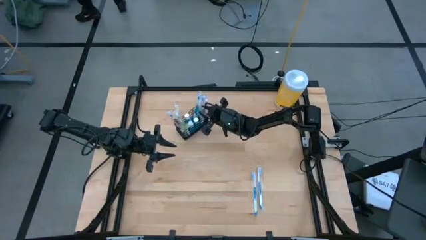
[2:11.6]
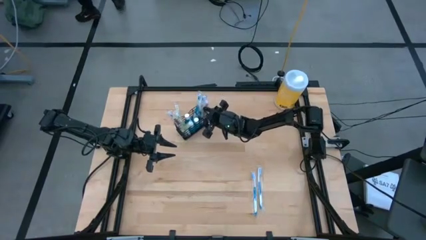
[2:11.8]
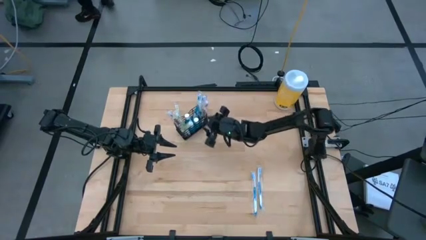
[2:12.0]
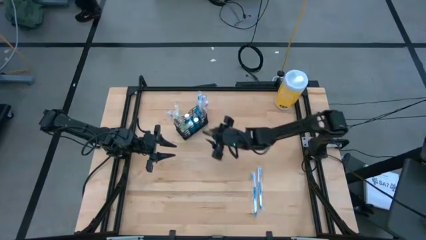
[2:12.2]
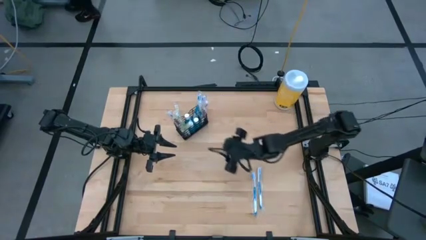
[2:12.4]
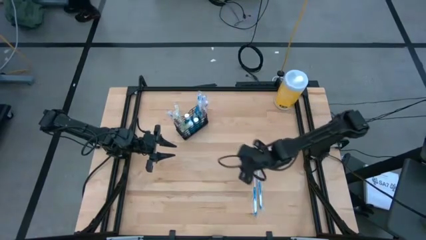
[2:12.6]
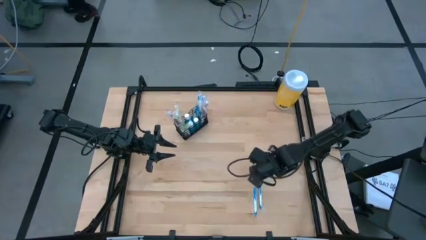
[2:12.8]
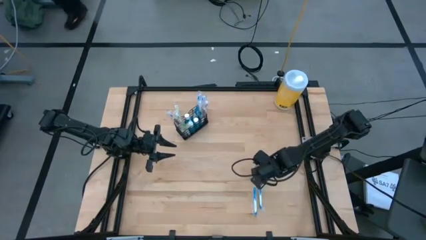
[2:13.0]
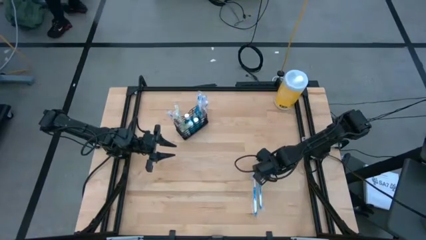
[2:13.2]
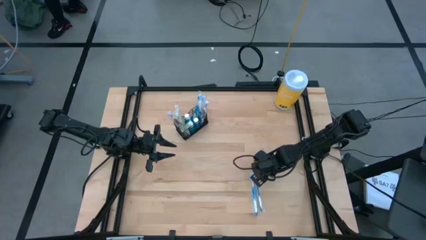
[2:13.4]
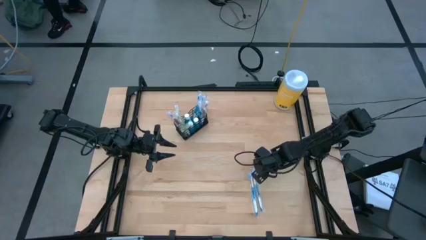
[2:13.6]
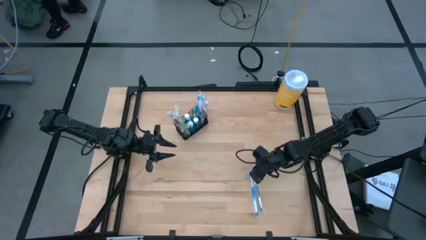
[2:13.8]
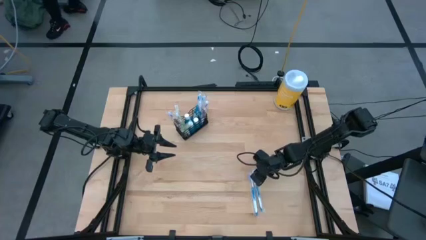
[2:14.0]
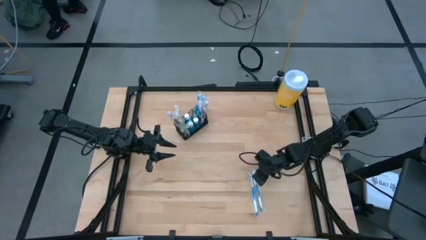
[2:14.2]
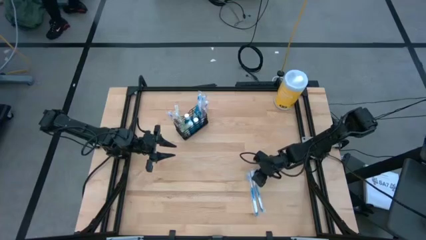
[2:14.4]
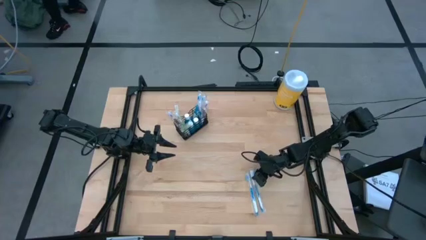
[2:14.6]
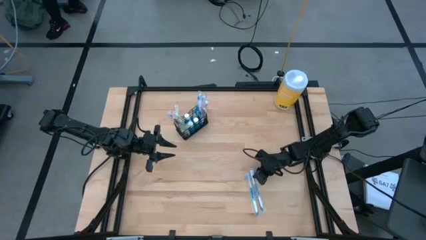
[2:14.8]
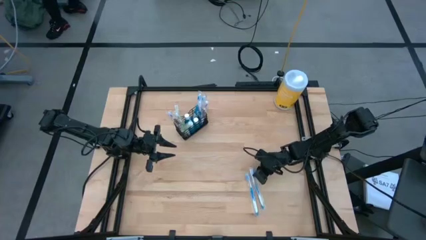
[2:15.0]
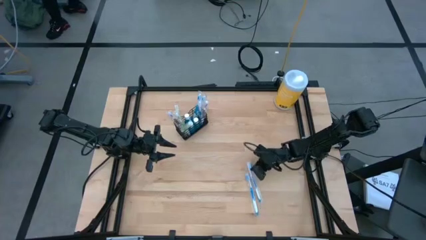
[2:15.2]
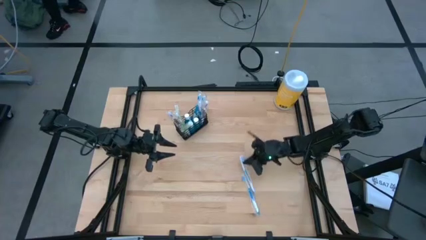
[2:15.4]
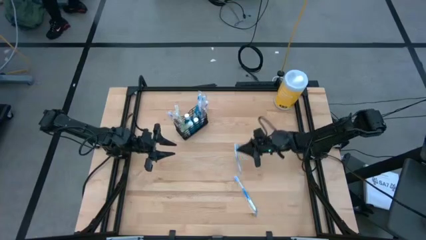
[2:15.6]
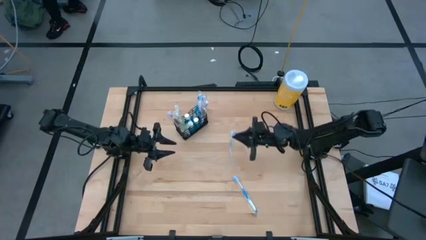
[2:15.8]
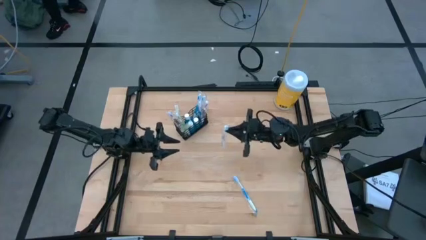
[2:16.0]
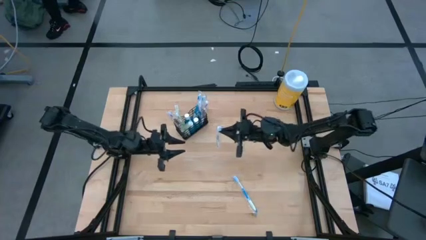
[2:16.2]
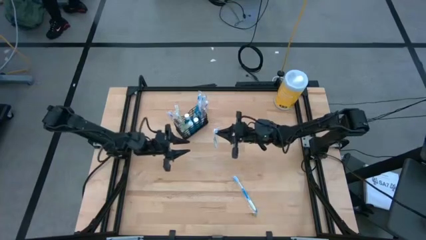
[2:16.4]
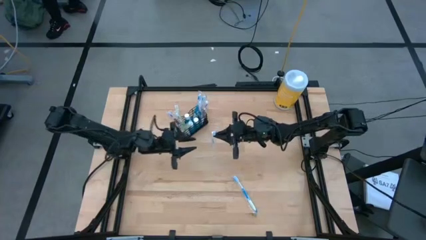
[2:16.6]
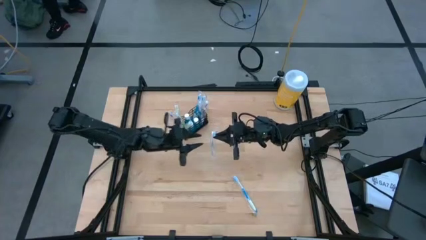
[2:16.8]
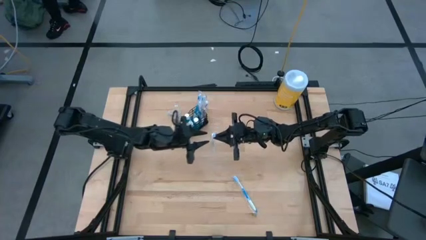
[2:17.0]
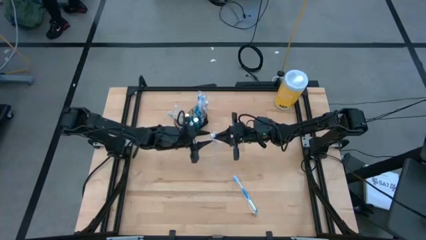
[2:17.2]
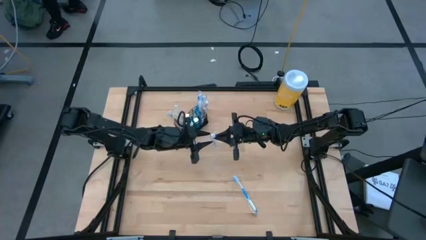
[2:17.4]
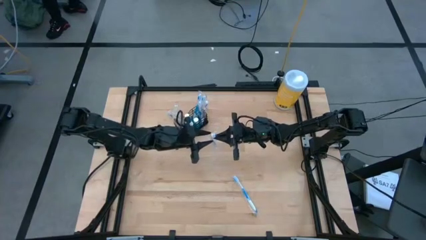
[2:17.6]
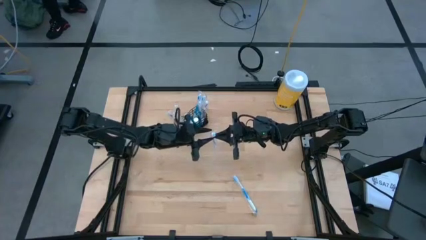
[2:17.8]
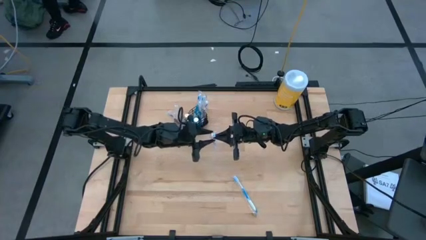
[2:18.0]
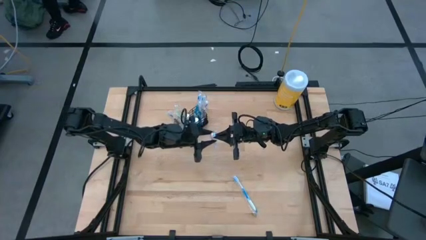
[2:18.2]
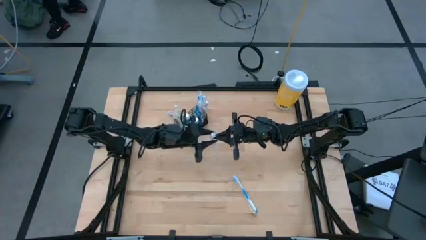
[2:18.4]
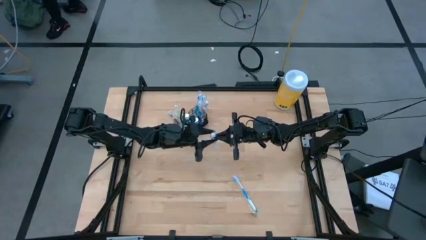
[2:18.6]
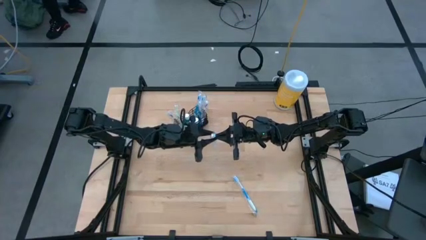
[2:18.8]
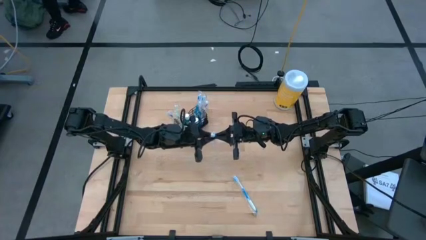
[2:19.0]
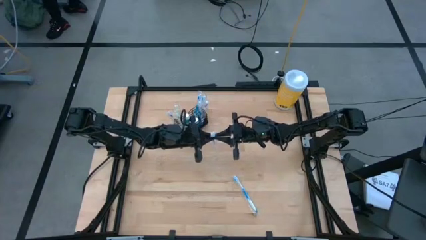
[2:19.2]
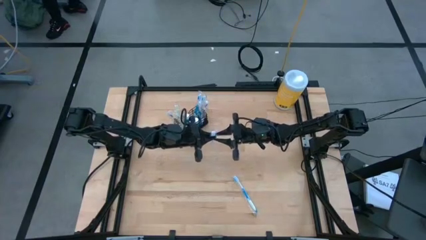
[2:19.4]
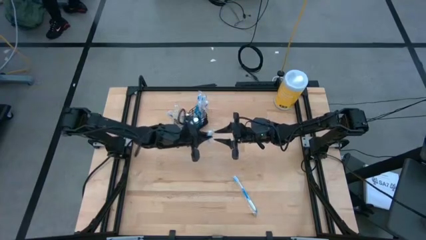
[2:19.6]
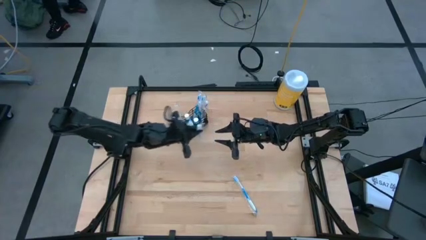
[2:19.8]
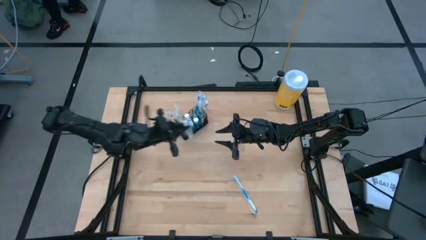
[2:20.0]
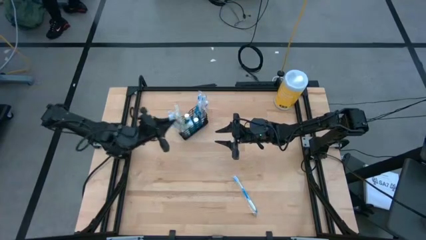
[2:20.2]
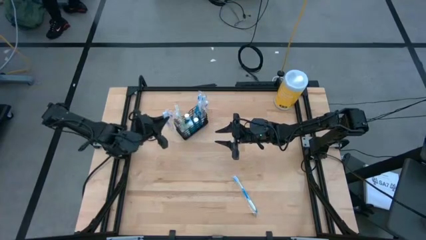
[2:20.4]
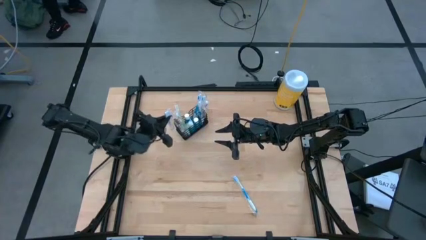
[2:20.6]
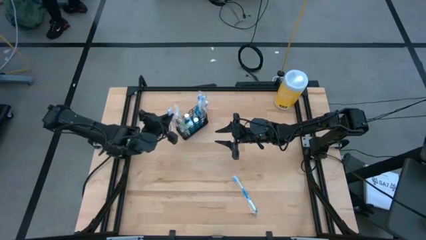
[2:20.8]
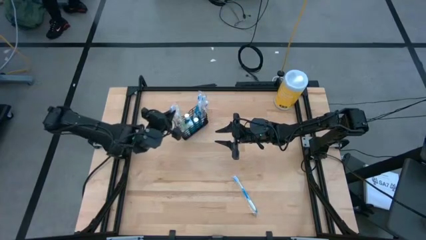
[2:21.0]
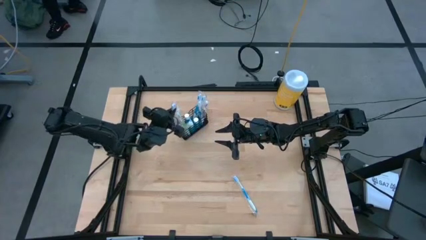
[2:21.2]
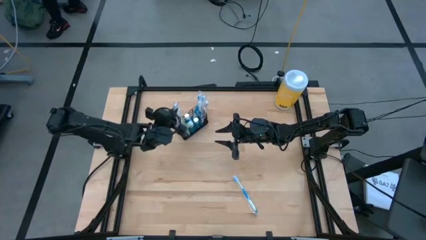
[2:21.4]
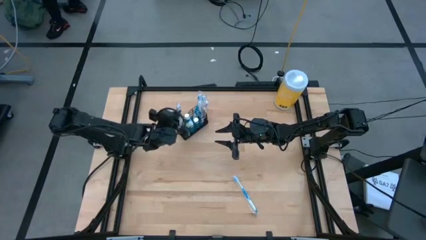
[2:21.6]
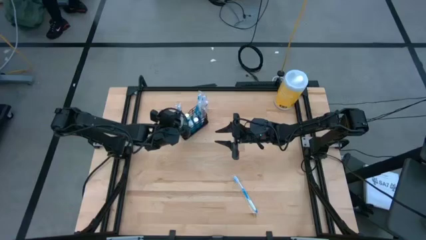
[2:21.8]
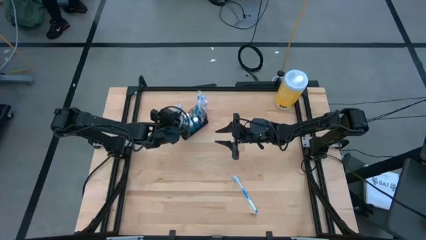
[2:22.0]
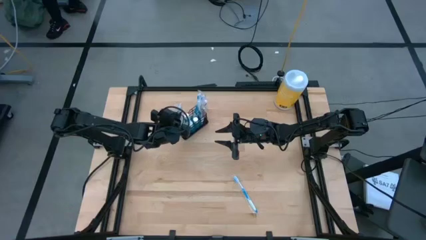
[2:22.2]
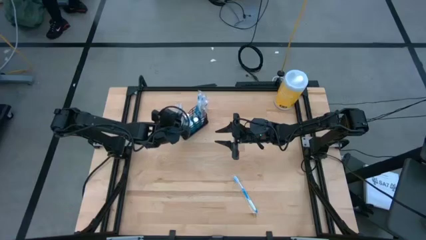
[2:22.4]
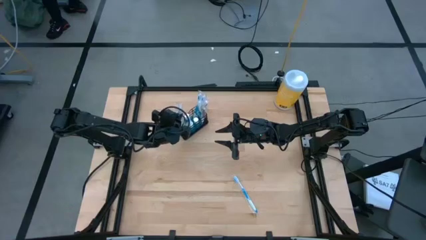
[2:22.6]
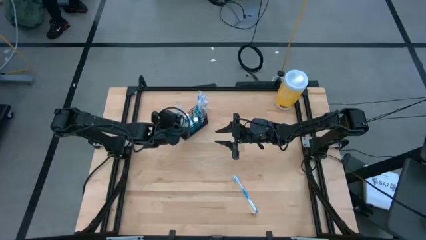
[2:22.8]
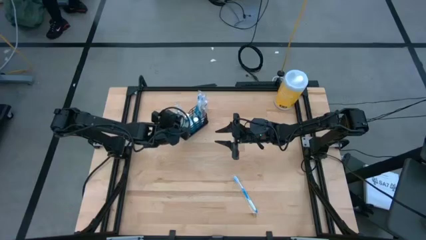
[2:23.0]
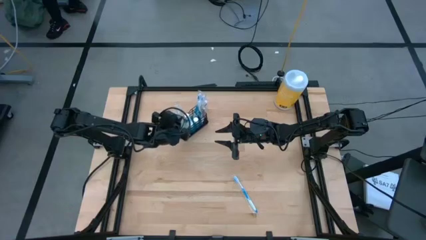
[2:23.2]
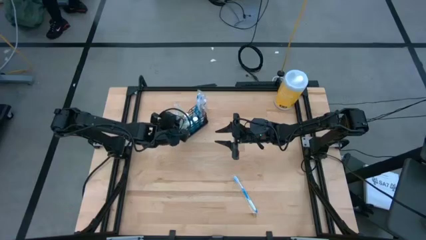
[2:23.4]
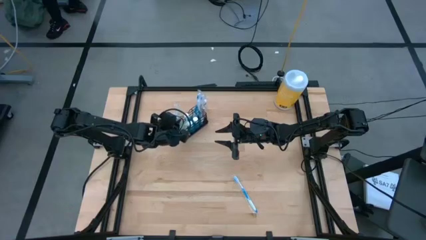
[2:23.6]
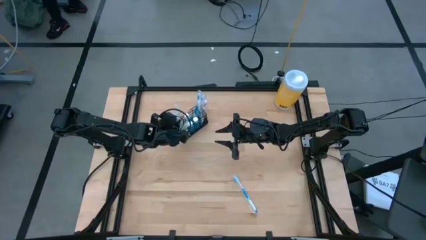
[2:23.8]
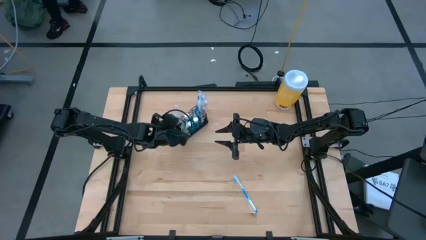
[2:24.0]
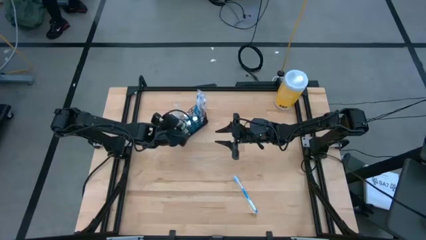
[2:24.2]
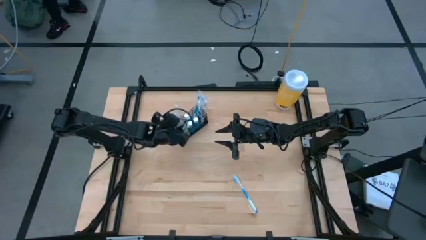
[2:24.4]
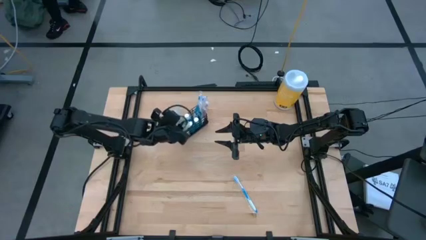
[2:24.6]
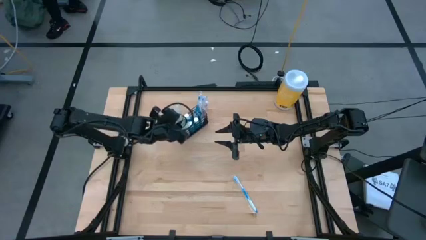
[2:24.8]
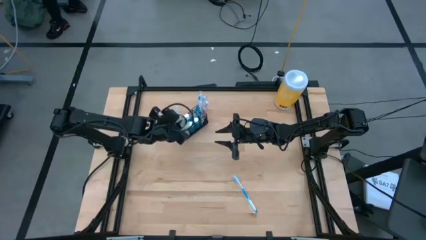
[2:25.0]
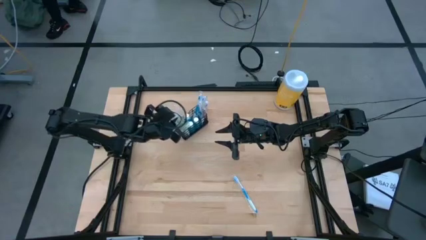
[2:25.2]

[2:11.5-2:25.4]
Task: Pick & Place toothbrushing station
Put the blue toothbrush into the black wire organizer
